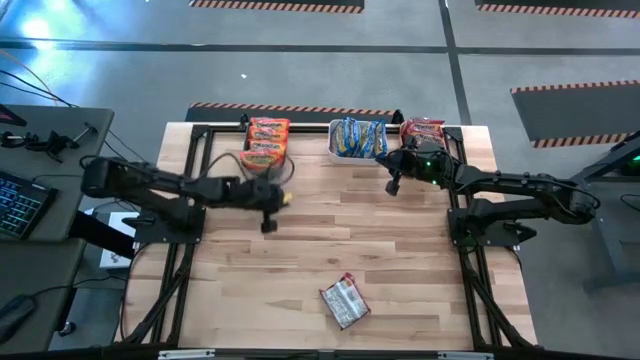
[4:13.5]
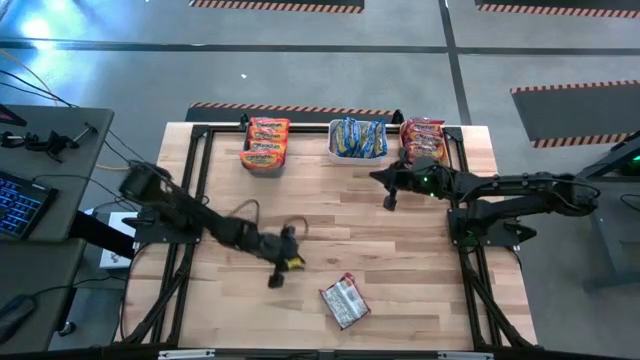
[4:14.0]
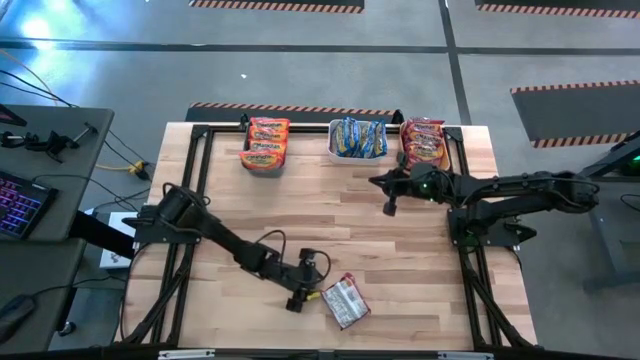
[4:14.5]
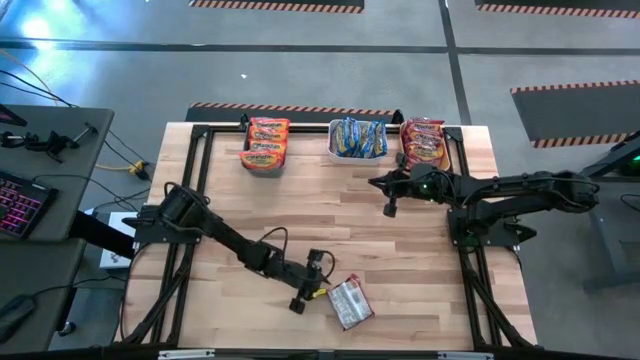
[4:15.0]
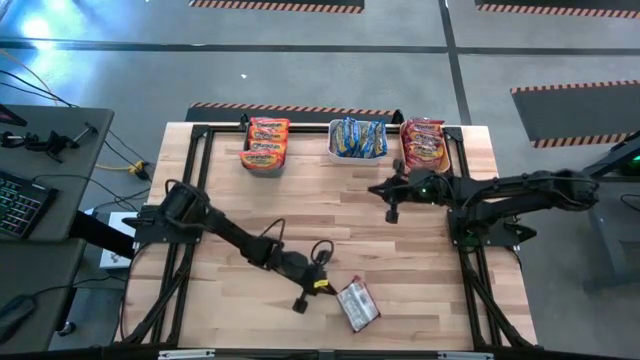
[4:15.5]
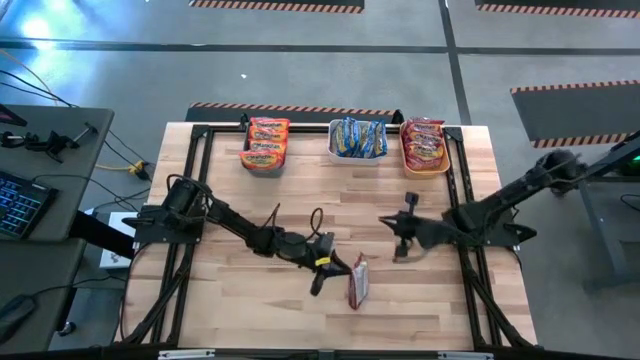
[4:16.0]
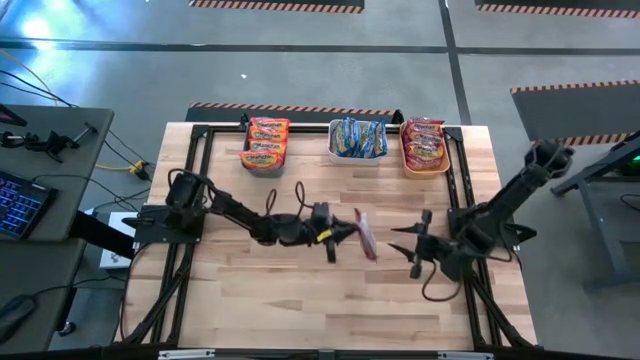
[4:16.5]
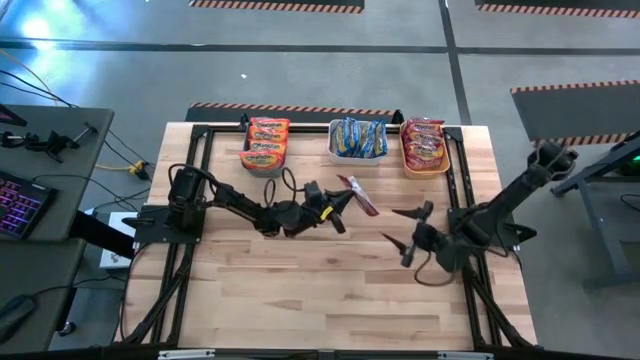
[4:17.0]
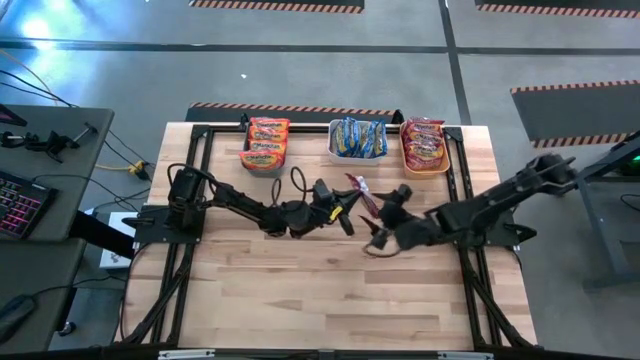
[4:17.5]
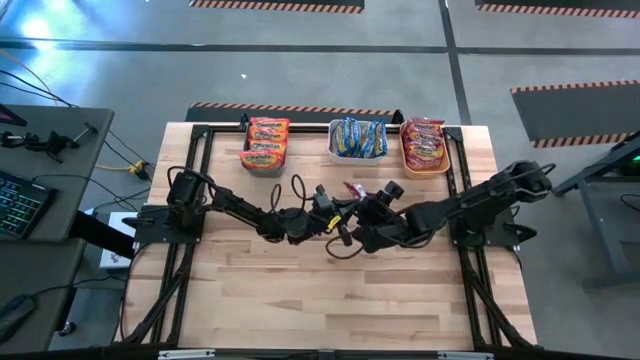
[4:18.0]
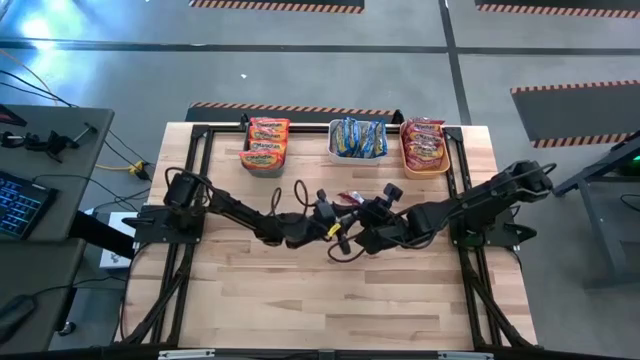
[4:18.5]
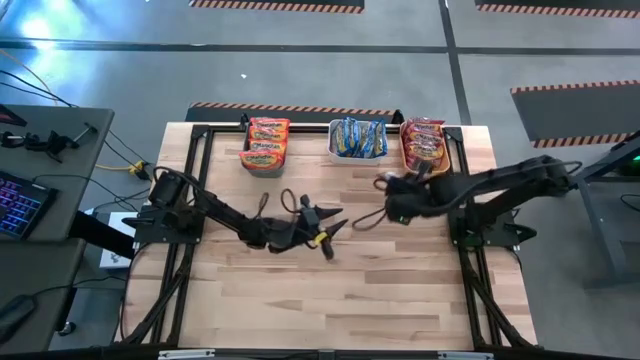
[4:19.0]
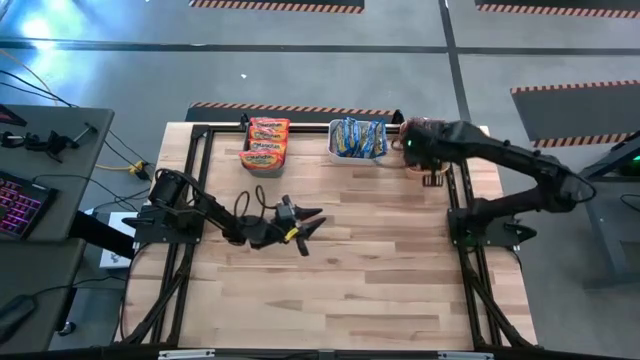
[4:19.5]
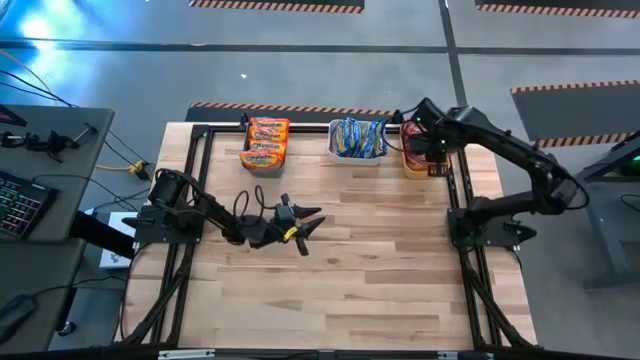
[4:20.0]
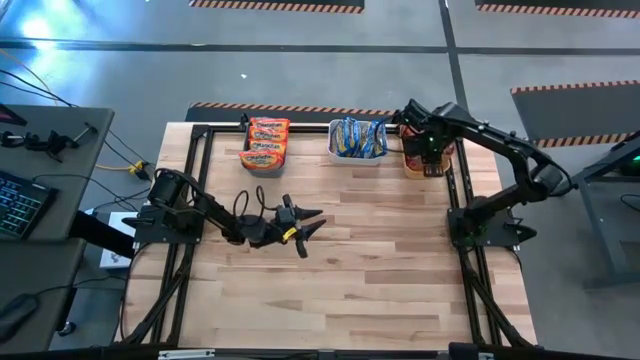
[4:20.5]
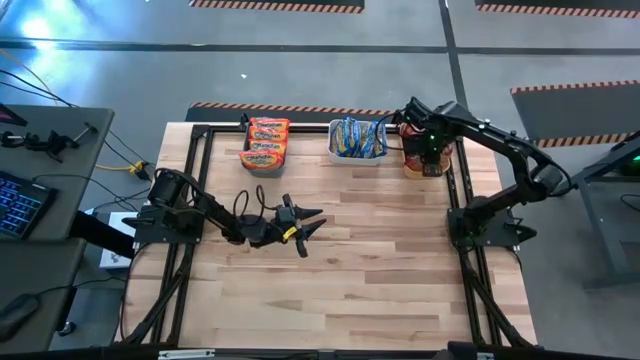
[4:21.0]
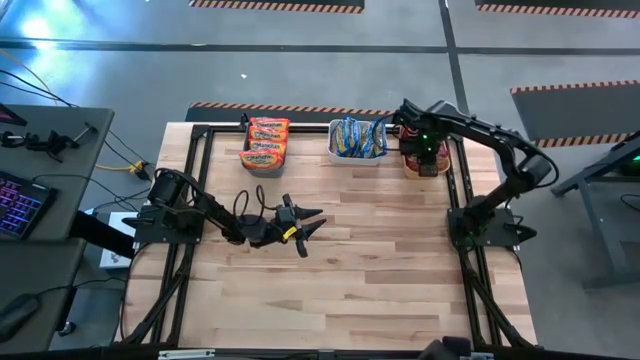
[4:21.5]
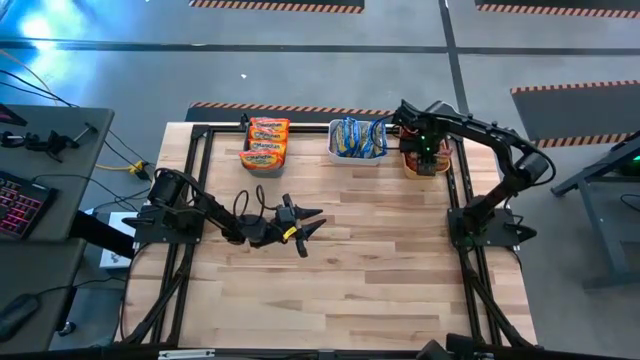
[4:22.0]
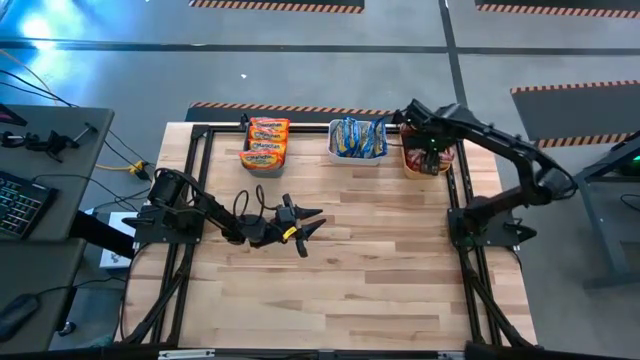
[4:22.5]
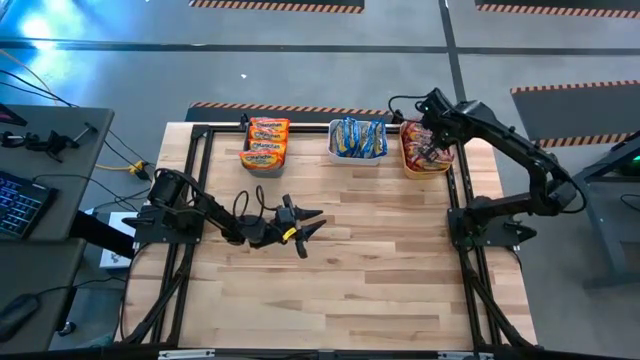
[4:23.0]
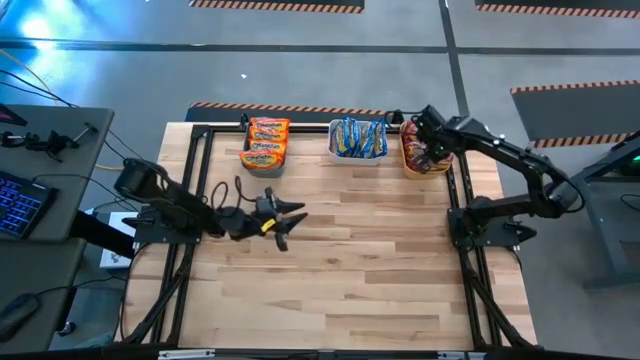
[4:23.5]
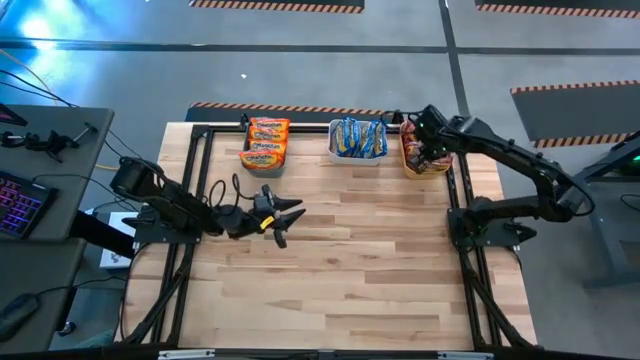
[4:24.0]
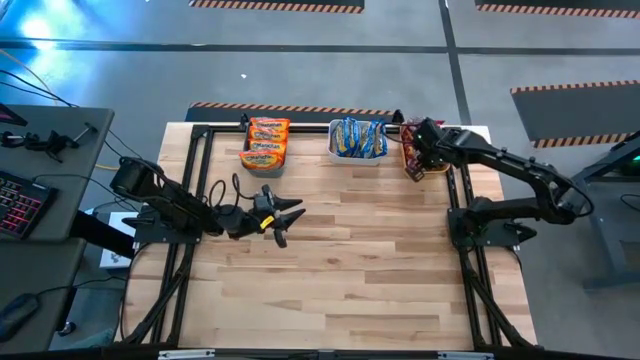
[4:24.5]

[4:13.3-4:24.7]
Task: Sort Maruchan noodles
Put the red noodle pack into the yellow bin

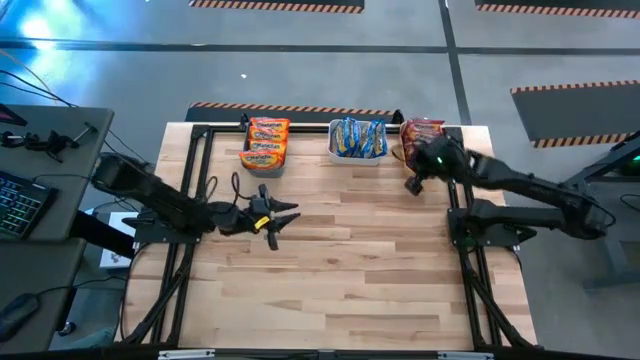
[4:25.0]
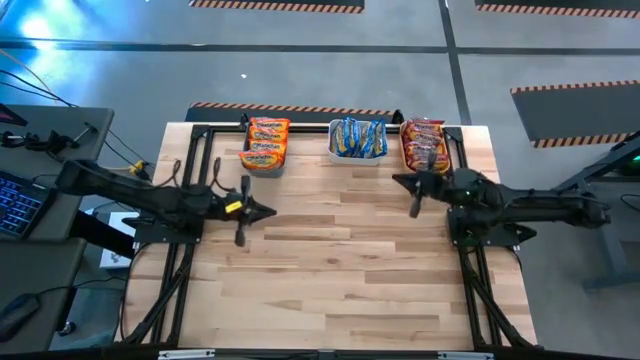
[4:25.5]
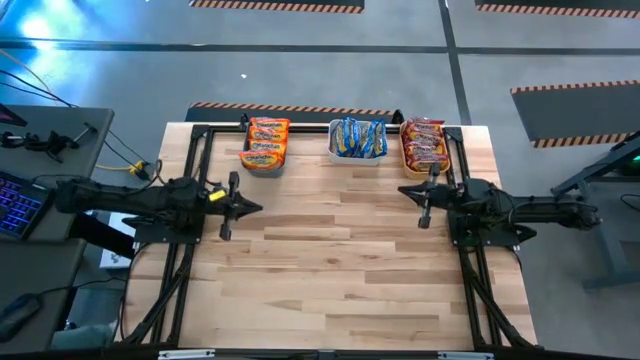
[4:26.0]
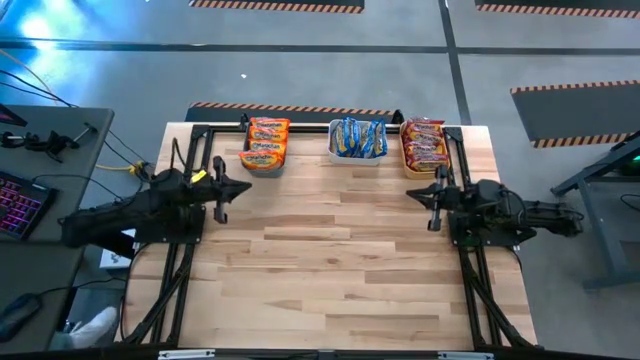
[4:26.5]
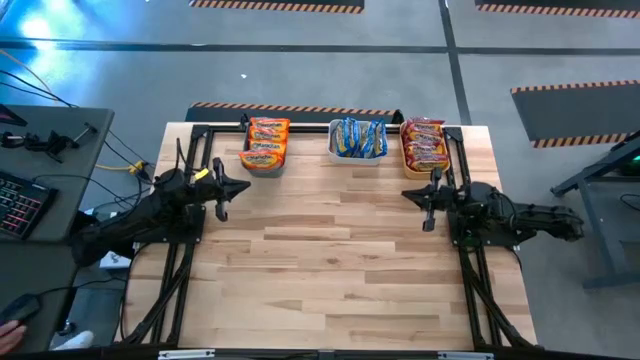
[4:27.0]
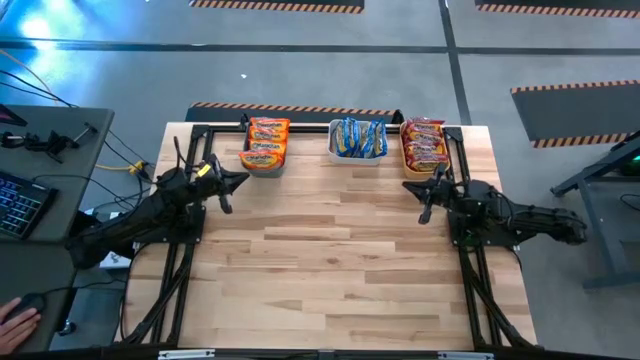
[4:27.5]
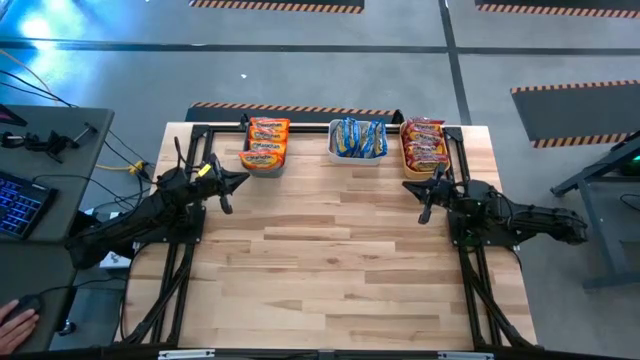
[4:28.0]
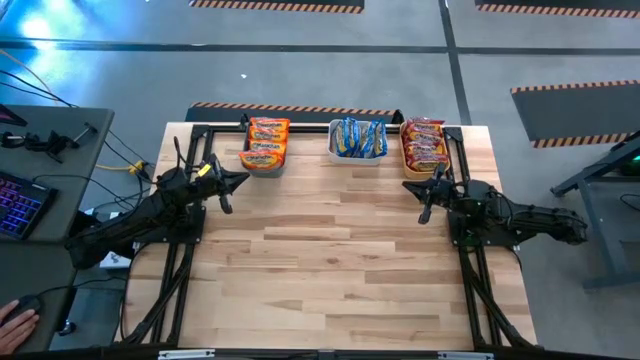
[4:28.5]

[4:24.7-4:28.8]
Return to Home Position

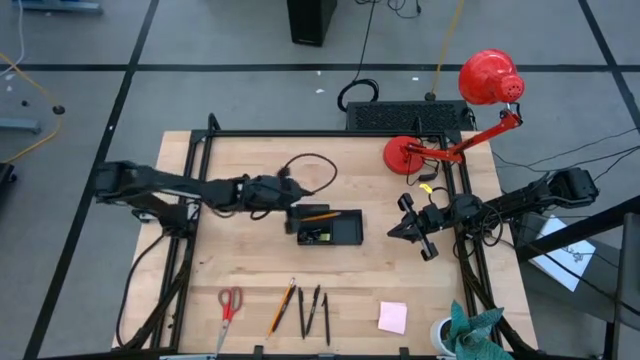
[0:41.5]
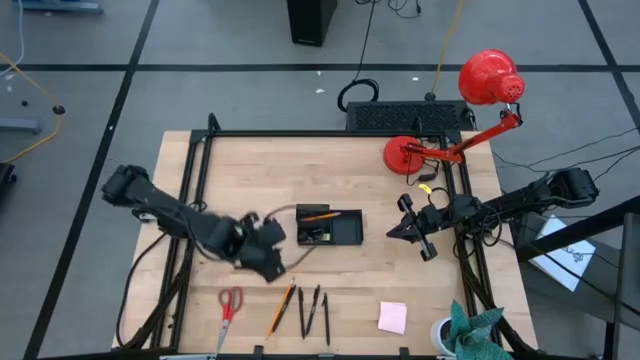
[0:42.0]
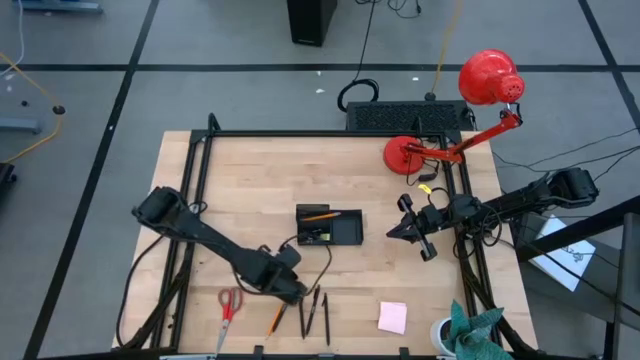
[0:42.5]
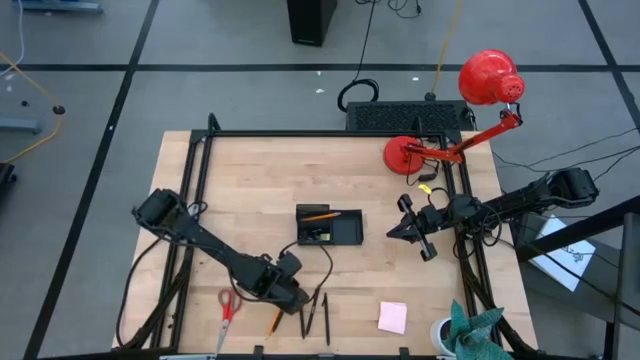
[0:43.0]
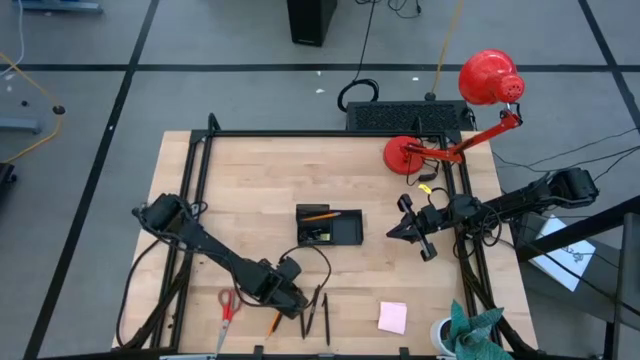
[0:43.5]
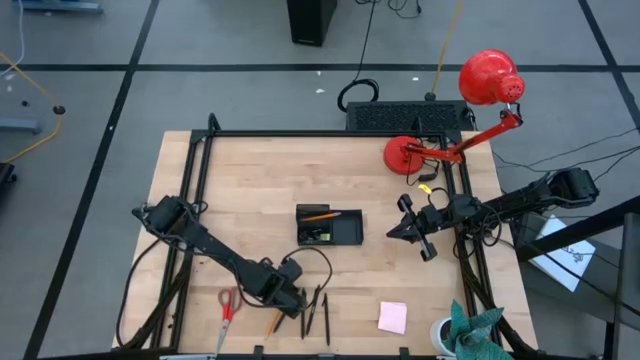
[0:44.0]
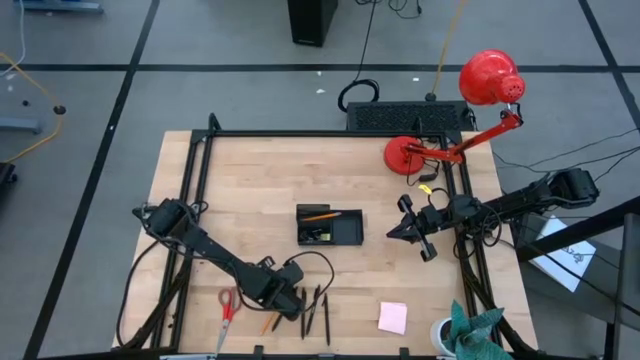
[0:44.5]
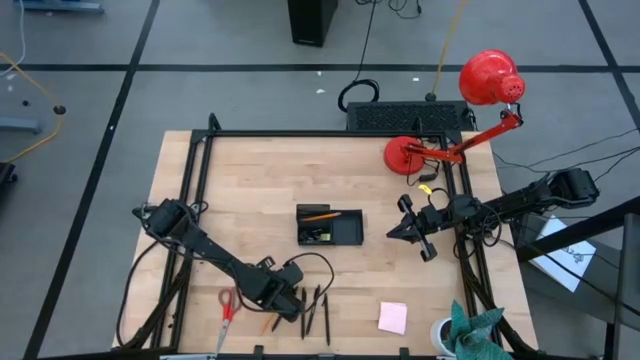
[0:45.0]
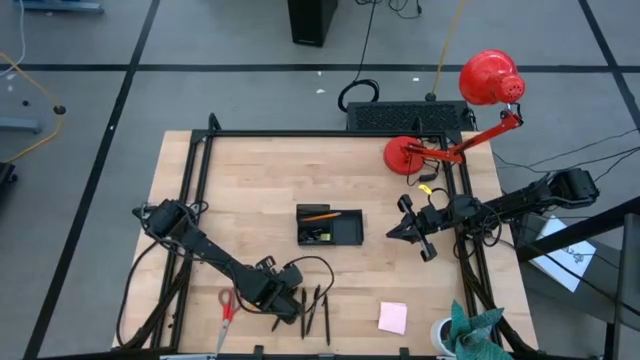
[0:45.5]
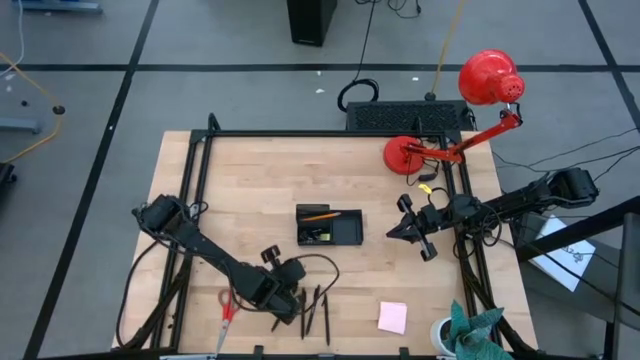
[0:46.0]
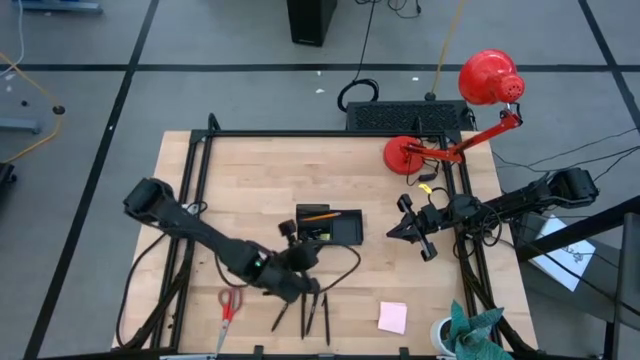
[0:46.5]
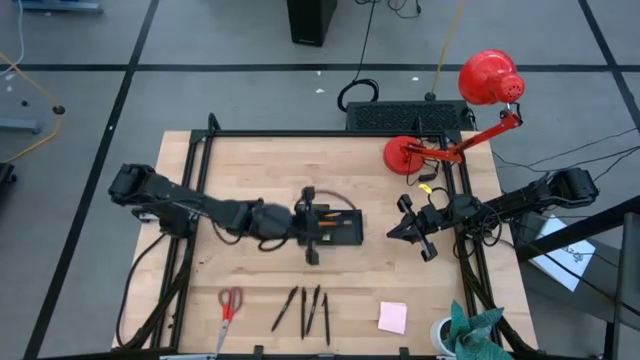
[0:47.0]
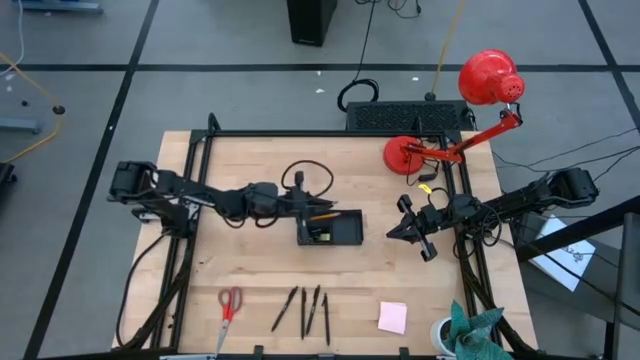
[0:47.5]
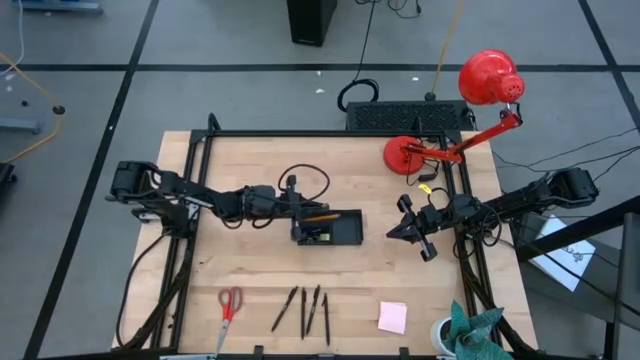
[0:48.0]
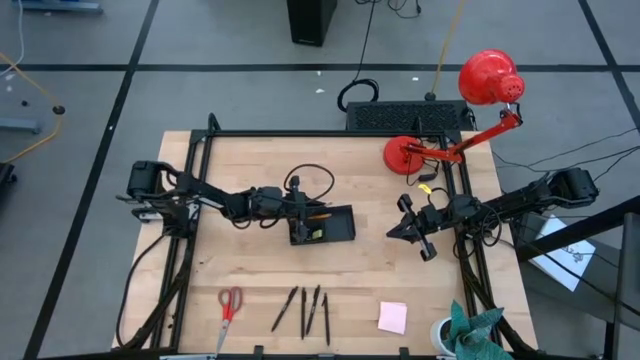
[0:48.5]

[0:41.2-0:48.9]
Task: Pick and place office supplies into organizer
Put the yellow pencil into the desk organizer
